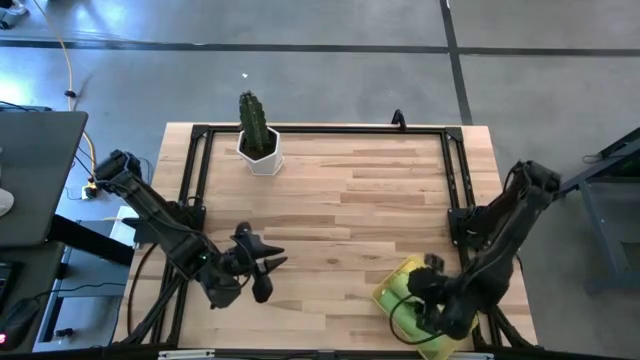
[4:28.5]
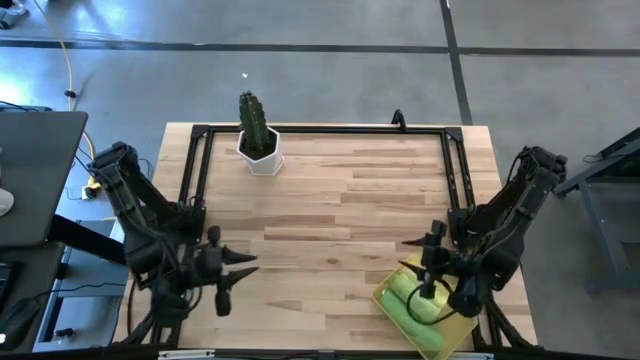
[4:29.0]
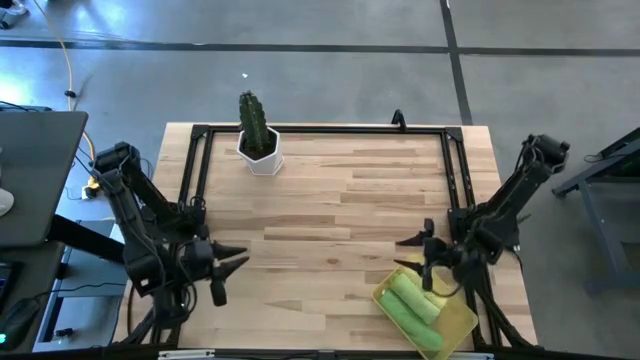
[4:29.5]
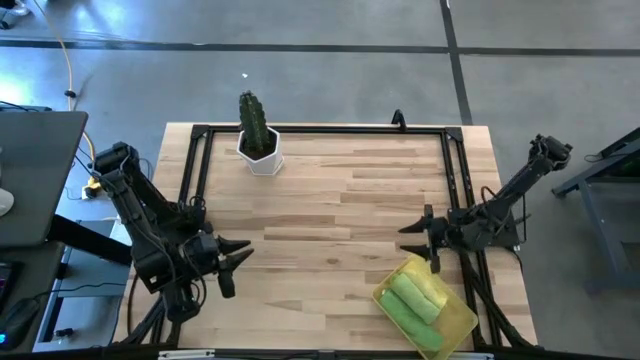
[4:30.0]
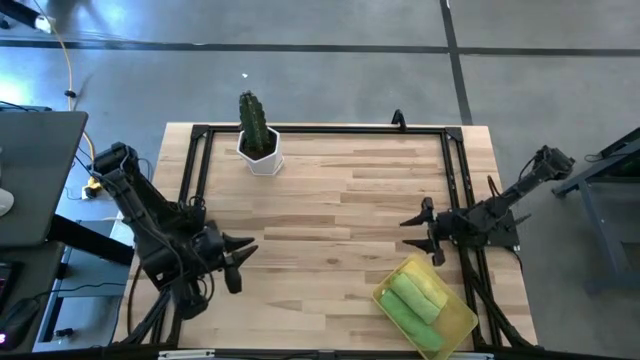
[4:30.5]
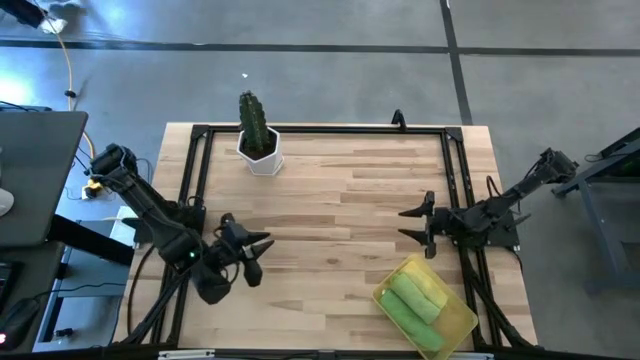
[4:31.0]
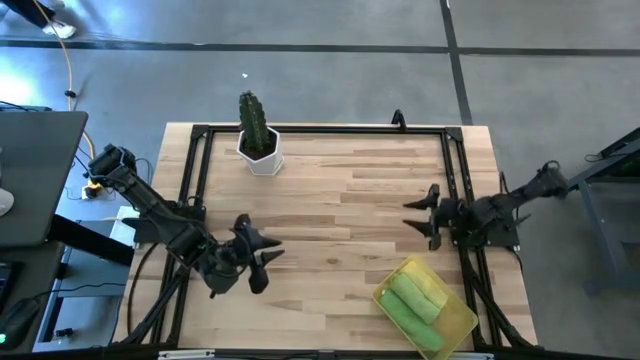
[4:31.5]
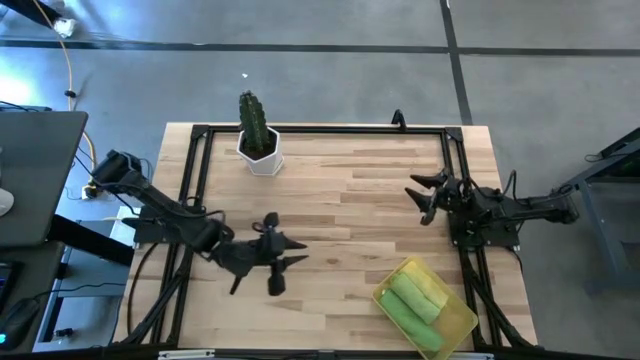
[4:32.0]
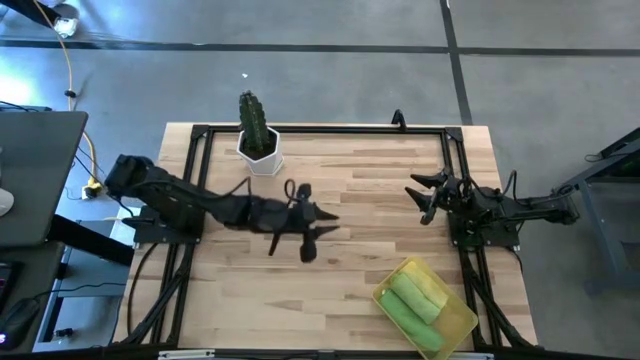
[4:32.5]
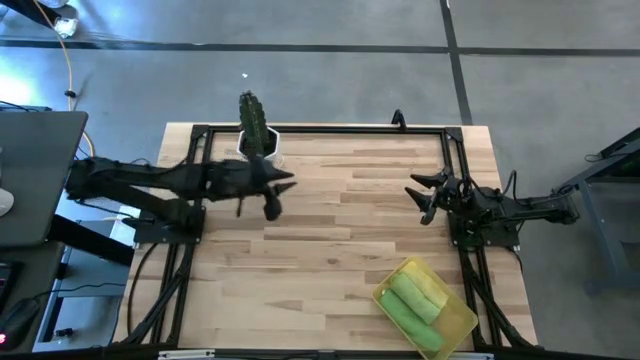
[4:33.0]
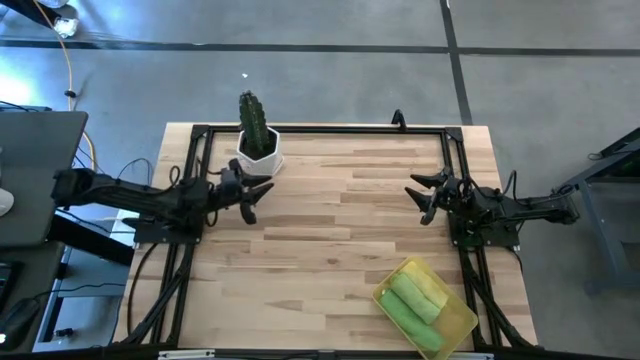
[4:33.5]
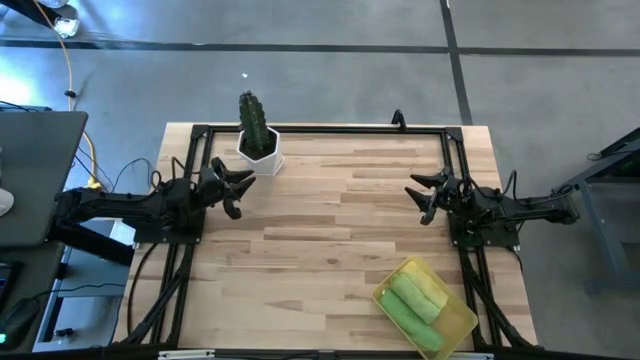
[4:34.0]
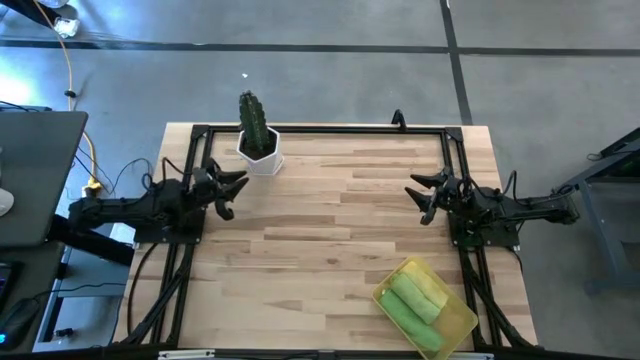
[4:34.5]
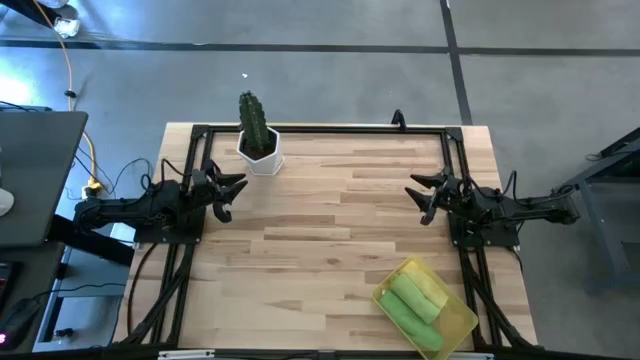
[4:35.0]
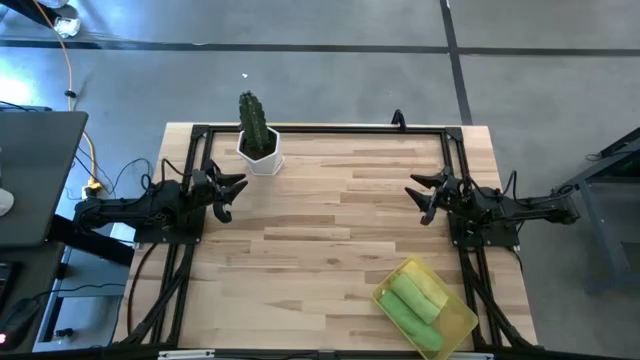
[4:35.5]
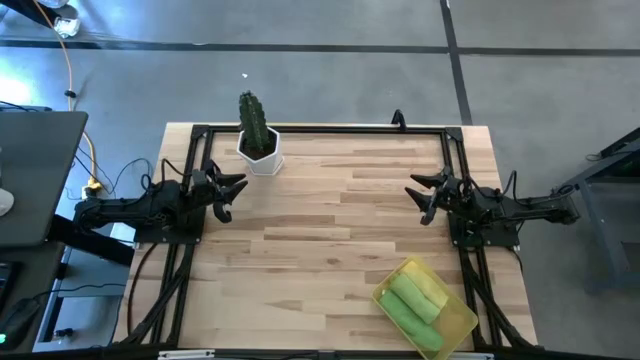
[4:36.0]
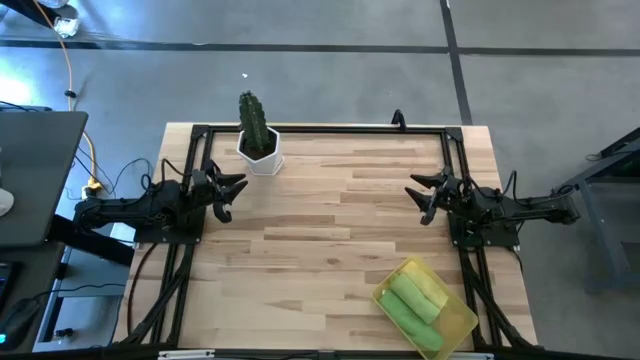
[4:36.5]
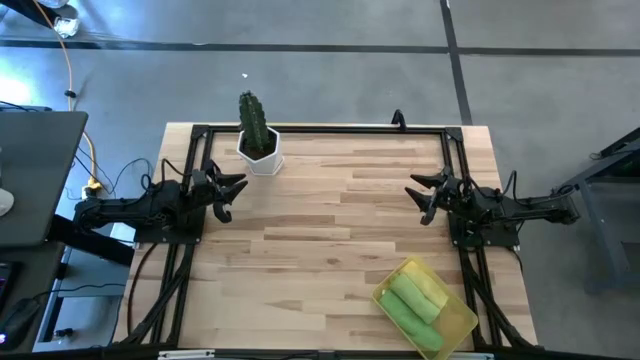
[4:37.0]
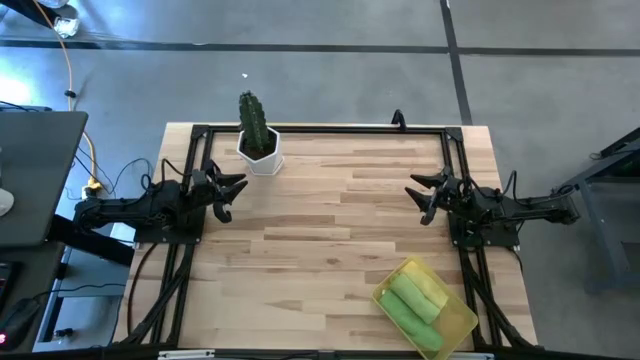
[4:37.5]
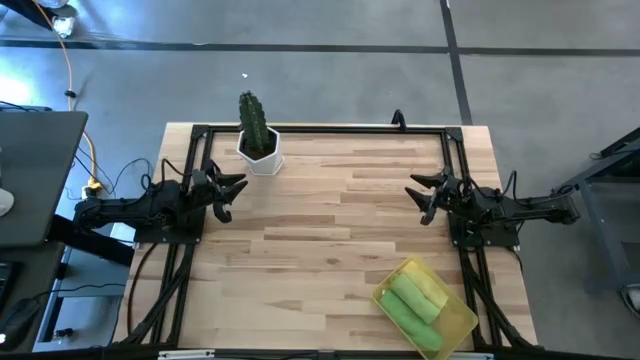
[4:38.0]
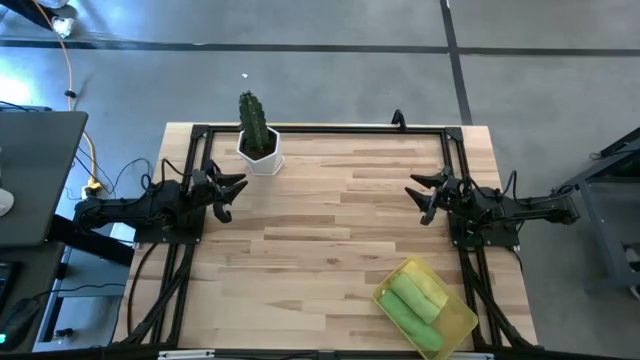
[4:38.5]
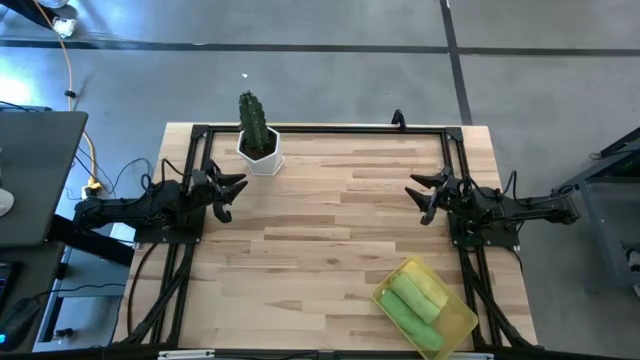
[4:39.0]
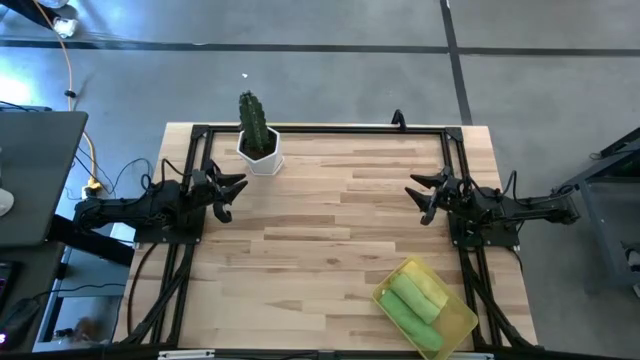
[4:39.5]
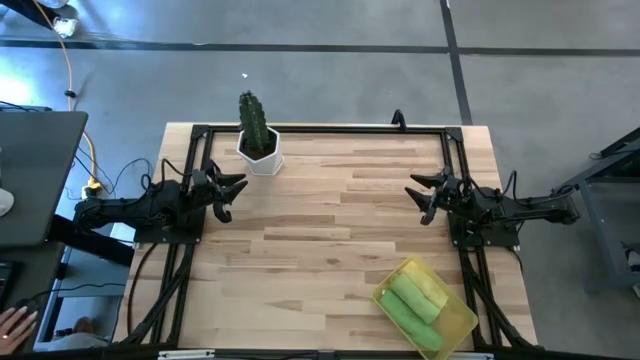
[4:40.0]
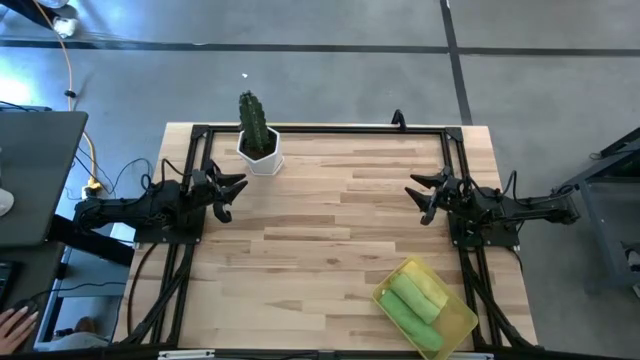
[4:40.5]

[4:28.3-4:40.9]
Task: Roll microfiber towels into tight, uniform cylinder then place into a basket
Return to Home Position

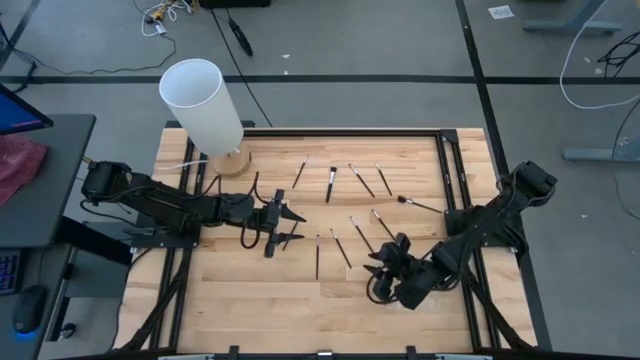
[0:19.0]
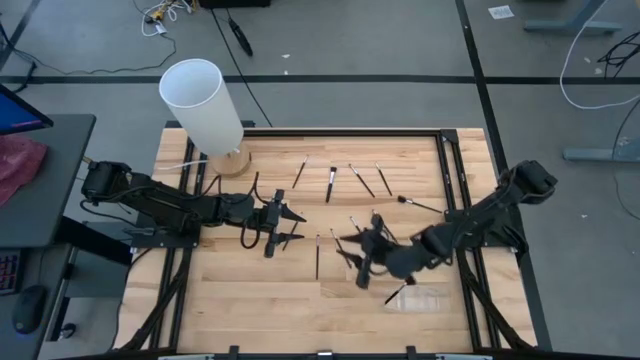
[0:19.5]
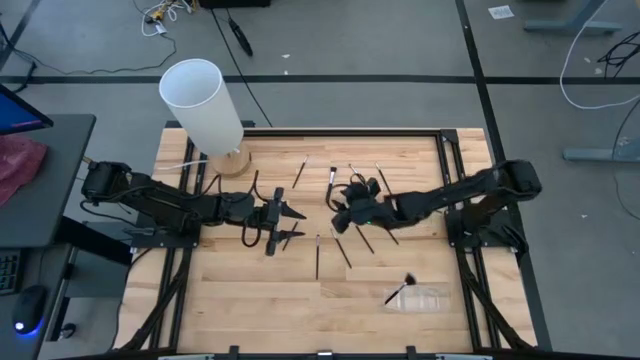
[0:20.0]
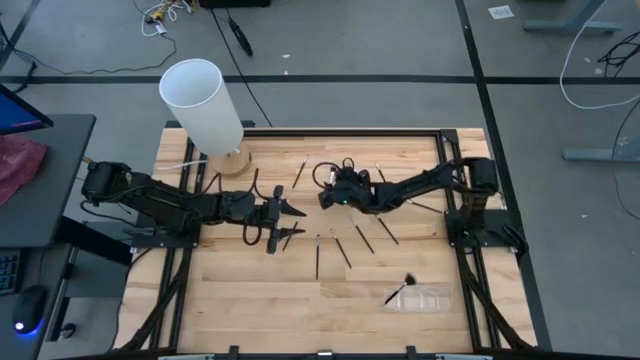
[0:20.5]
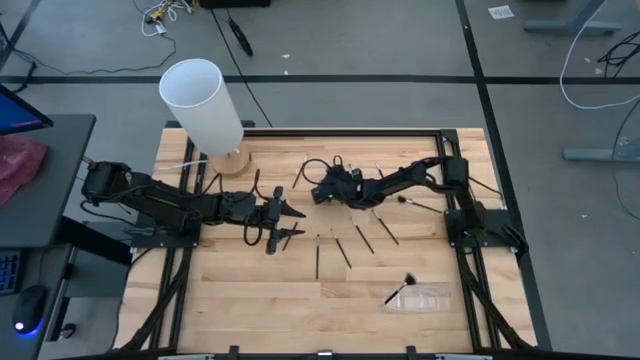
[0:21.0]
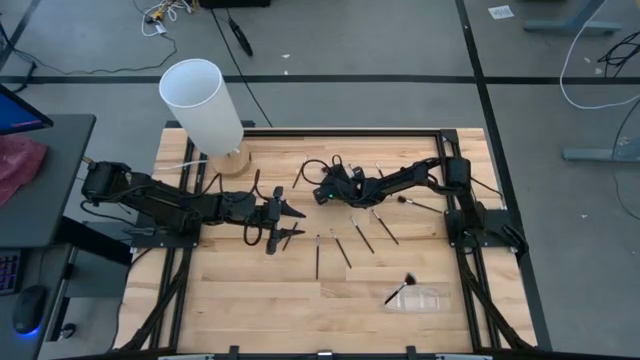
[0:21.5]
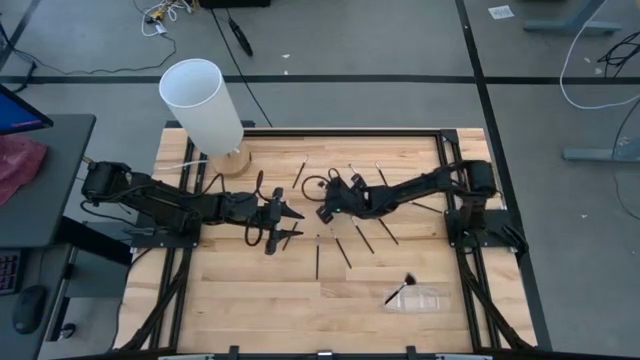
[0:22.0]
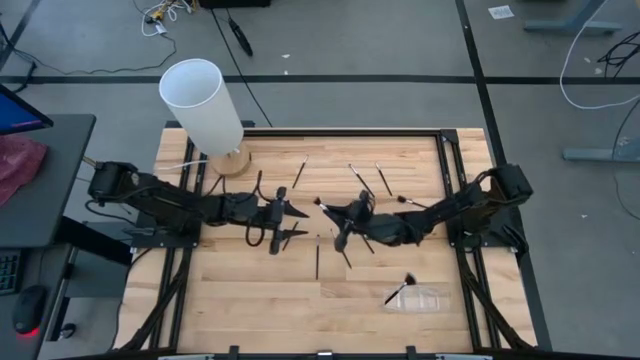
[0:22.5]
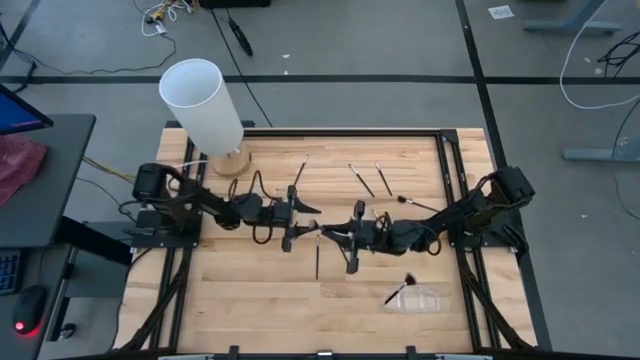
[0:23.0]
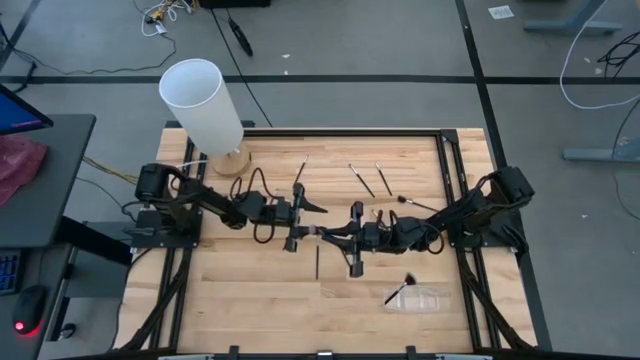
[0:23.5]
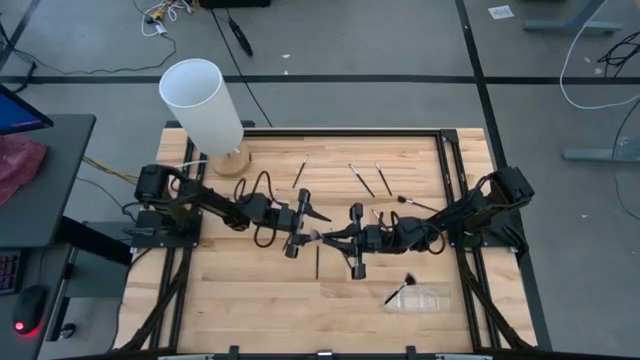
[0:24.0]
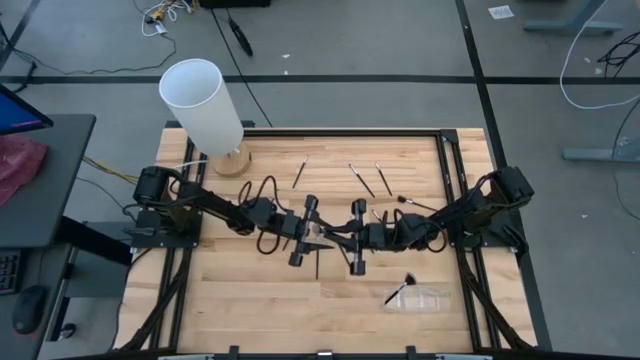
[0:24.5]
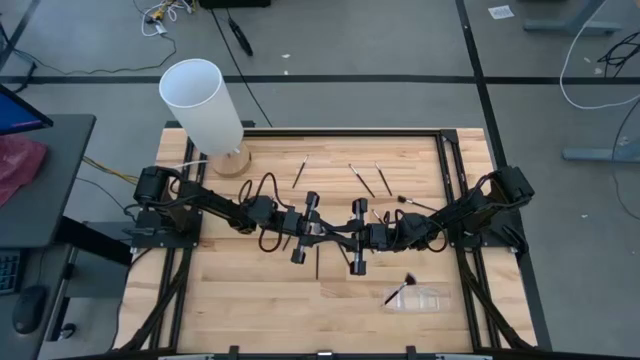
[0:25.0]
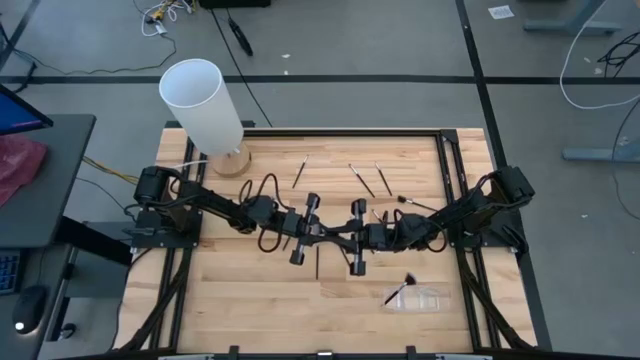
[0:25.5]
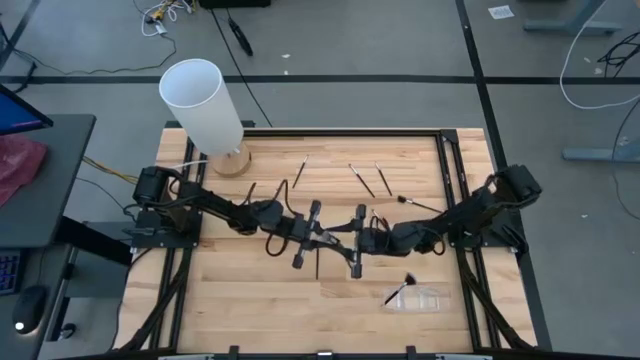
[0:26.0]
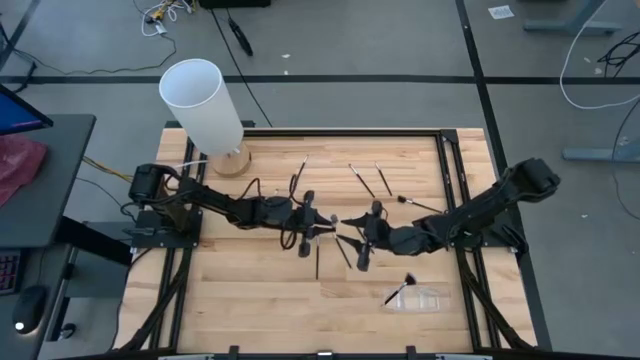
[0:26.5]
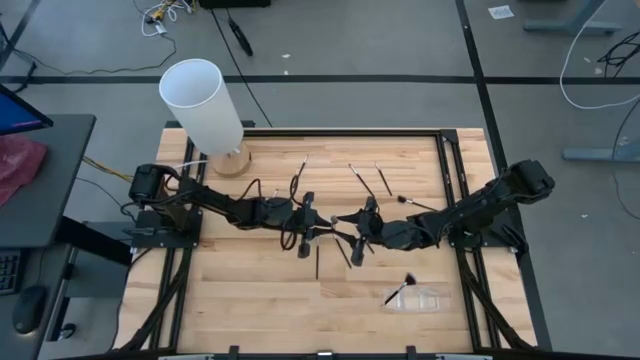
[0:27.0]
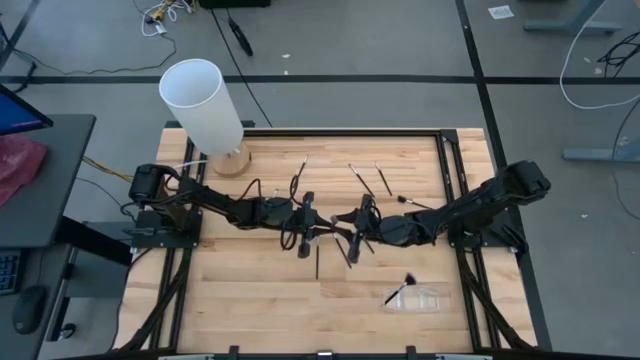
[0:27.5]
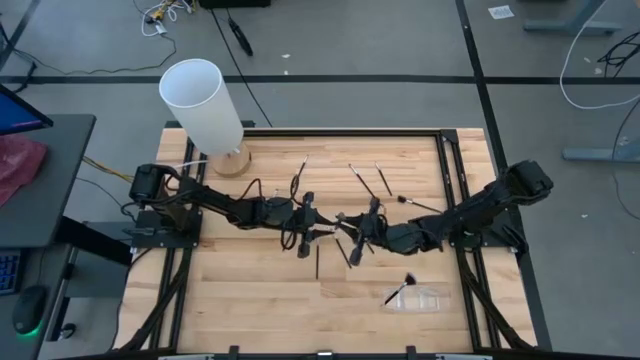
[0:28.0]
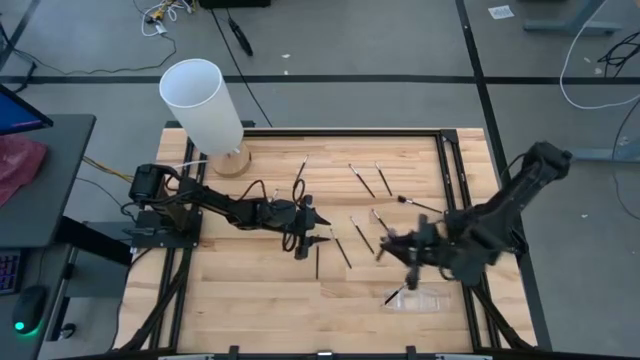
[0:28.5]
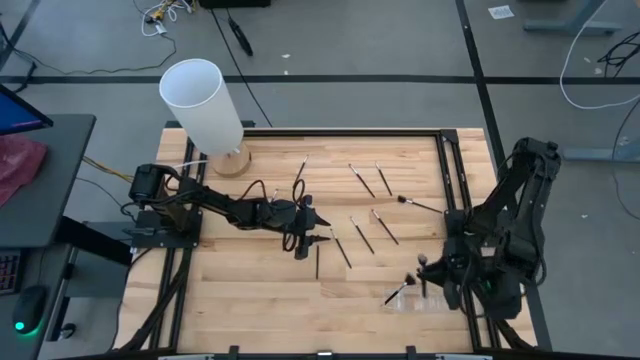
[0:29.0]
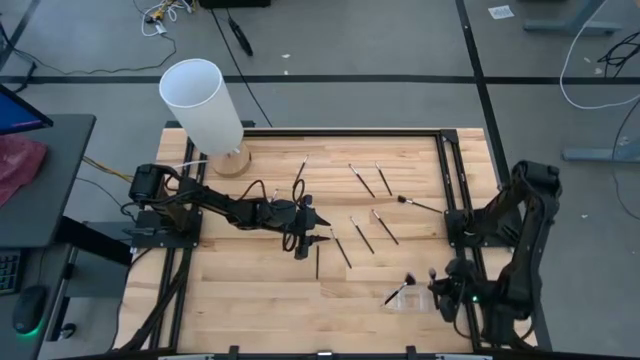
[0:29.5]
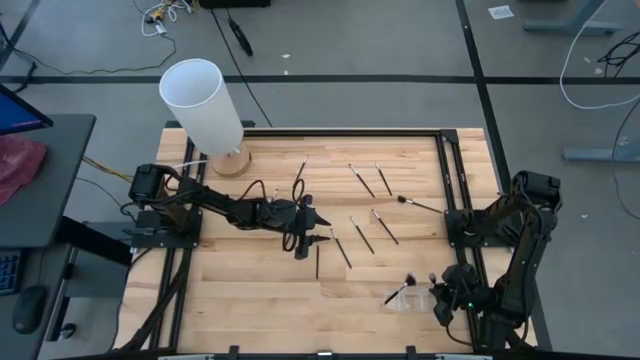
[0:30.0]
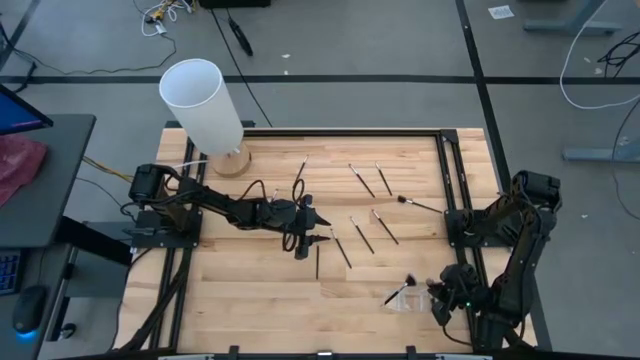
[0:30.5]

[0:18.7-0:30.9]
Task: Pick & Place Makeup Supplies
Put the silver makeup brush into the transparent organizer
